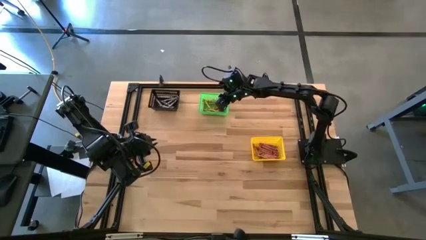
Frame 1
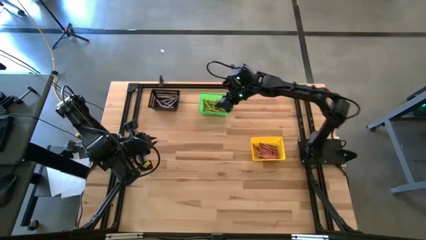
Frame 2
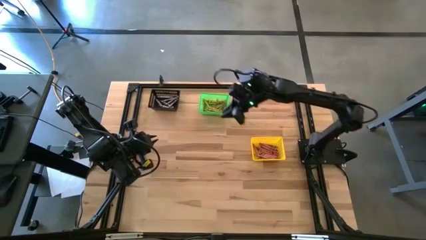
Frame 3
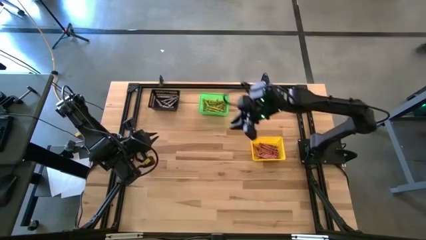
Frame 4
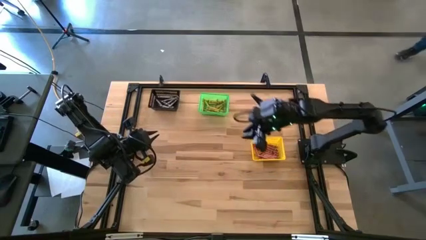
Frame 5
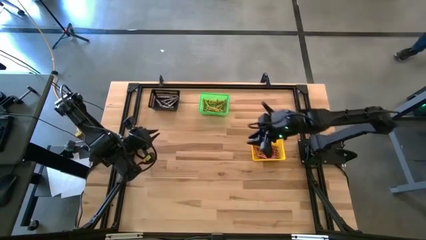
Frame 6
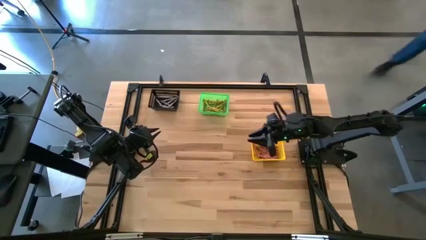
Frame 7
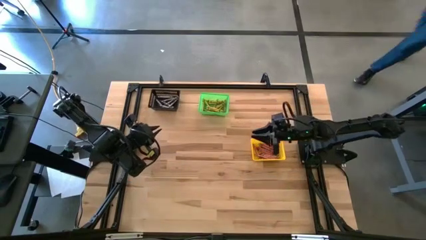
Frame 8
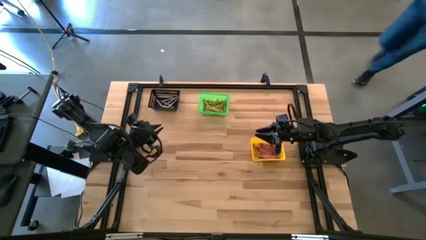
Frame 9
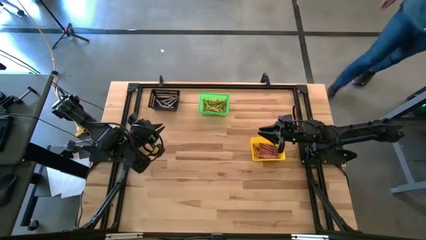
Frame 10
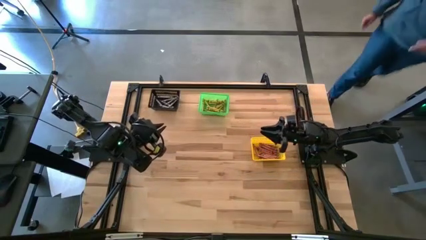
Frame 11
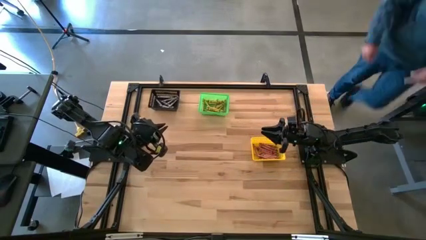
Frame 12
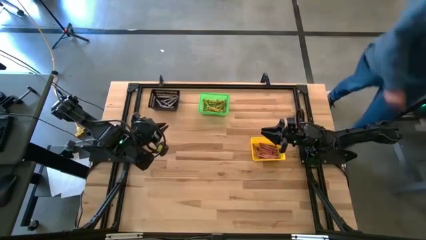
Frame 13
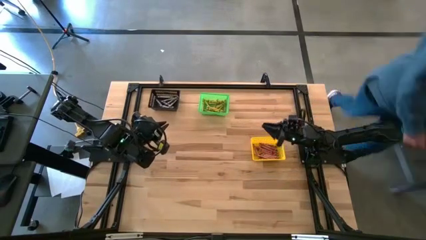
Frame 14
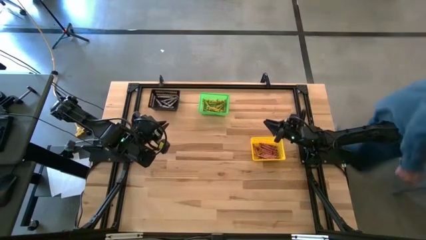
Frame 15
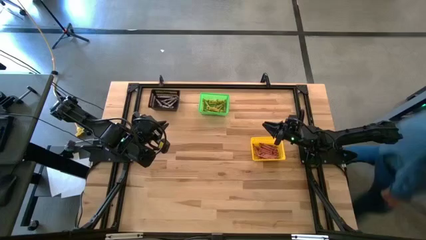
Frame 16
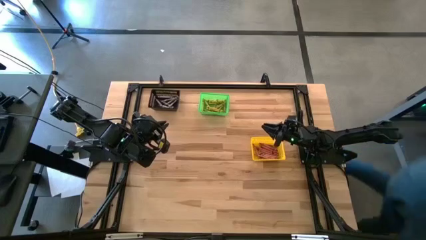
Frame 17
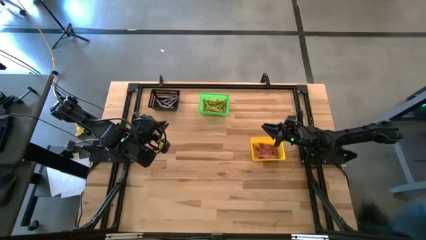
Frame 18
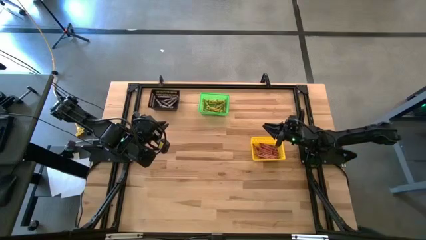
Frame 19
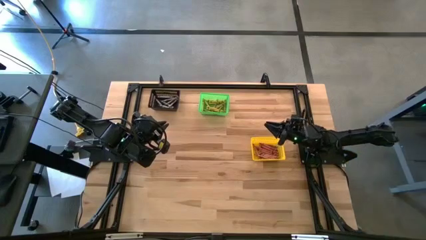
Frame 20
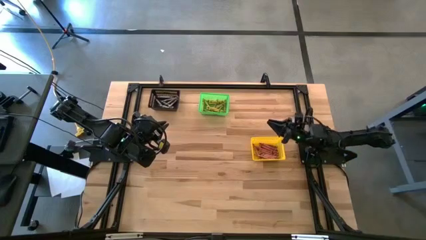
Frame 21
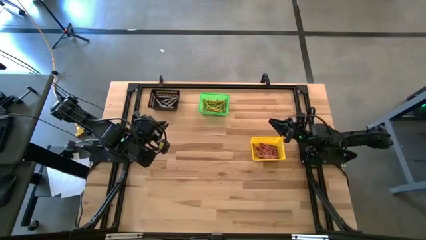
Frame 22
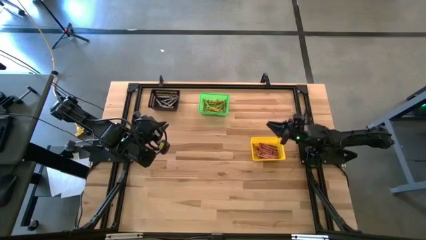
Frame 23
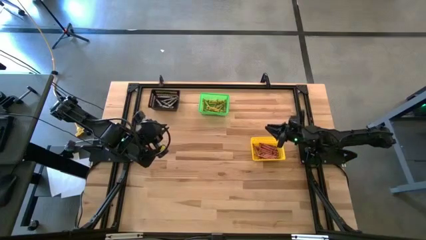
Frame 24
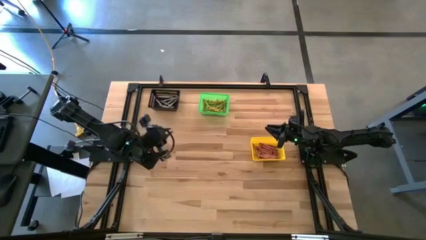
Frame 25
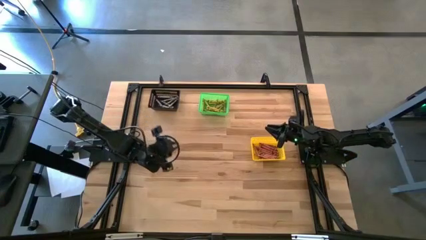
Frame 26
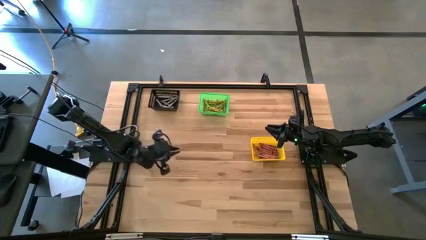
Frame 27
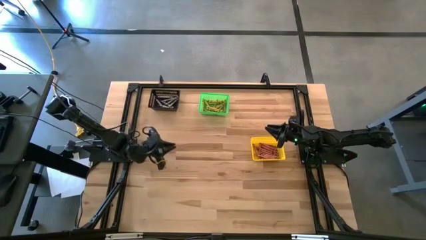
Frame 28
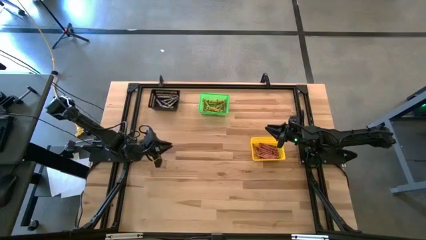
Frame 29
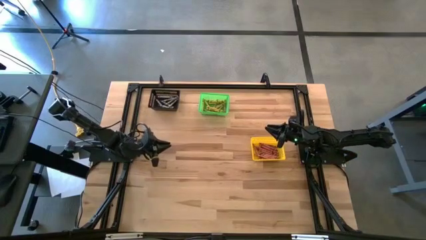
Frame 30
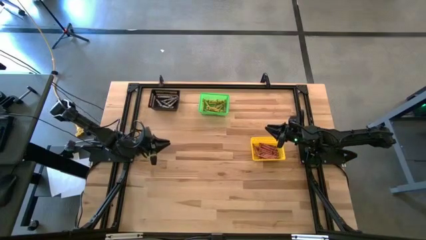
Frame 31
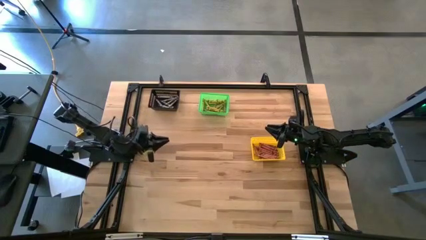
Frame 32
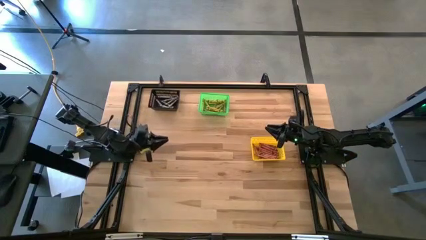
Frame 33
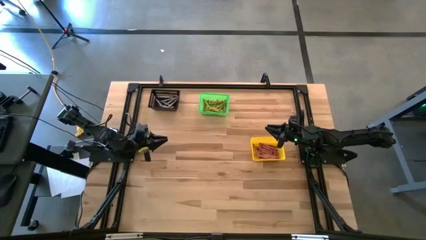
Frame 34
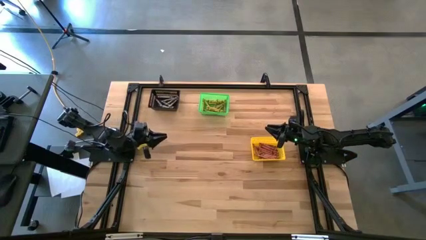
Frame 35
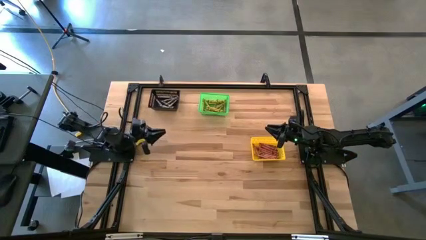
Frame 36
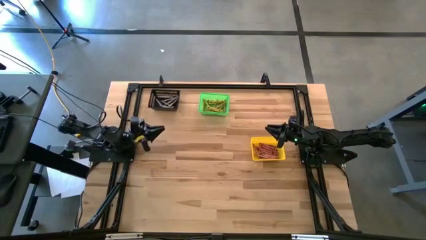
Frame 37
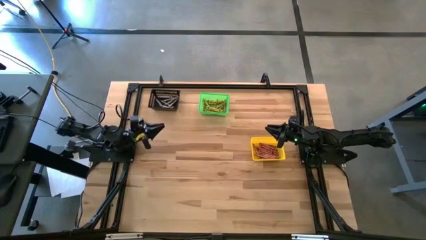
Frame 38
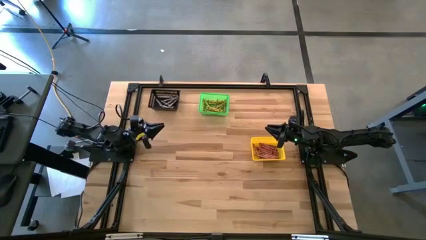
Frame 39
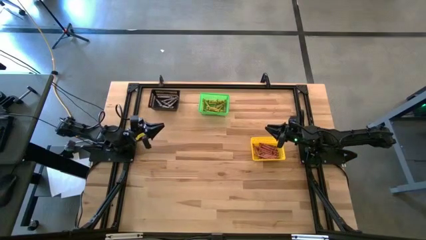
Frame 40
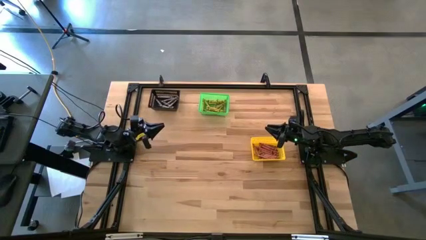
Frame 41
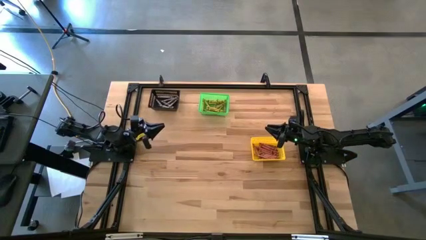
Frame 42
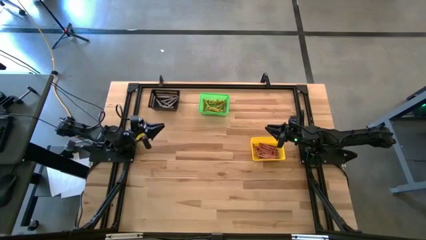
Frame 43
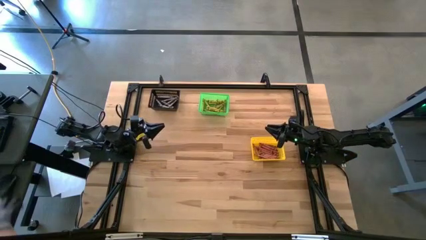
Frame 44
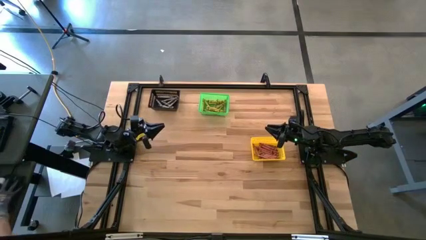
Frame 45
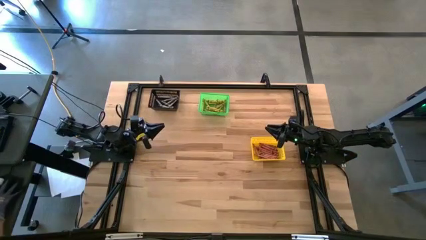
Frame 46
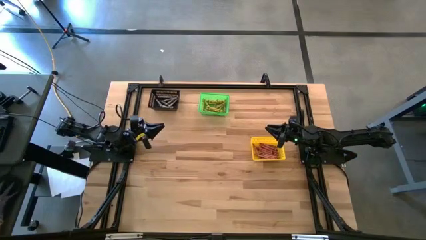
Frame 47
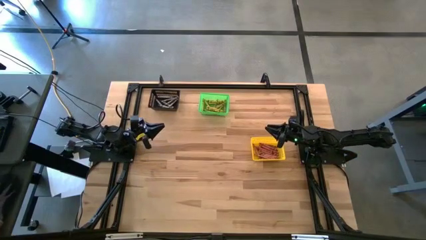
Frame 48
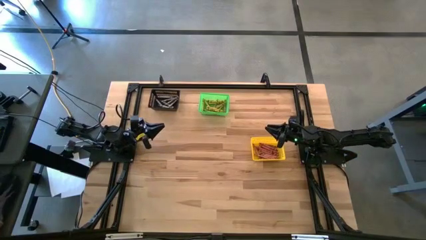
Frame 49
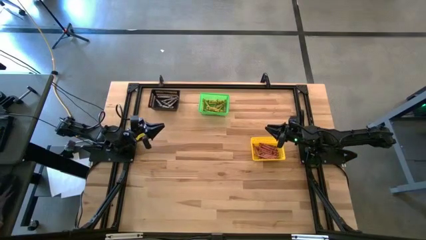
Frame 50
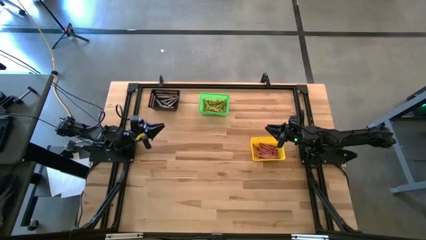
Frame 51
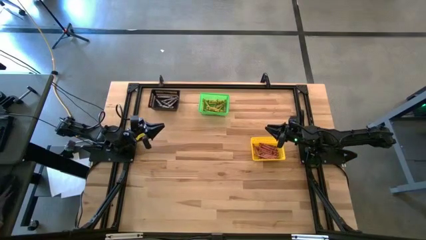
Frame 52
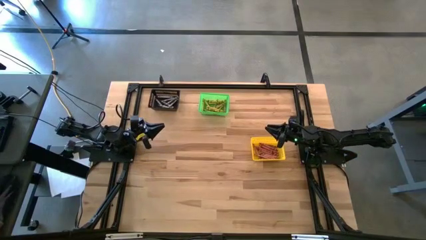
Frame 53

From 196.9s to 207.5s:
Task: Sort crayons
Return to Home Position

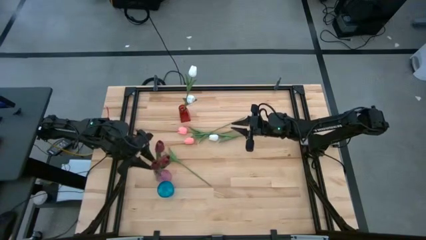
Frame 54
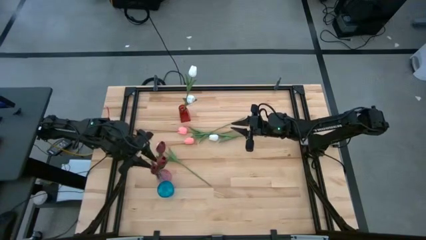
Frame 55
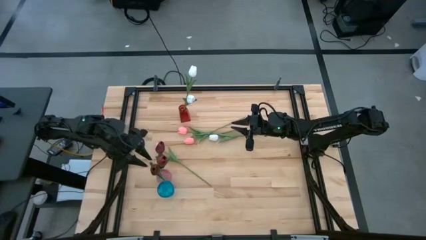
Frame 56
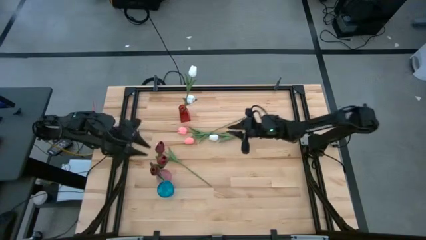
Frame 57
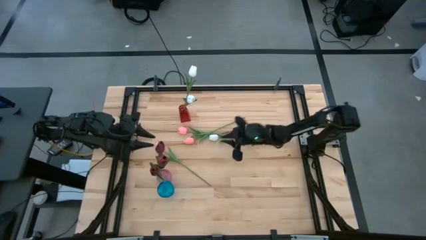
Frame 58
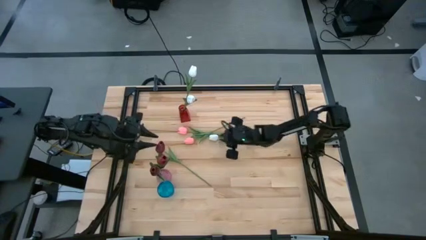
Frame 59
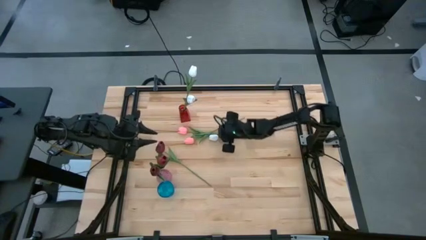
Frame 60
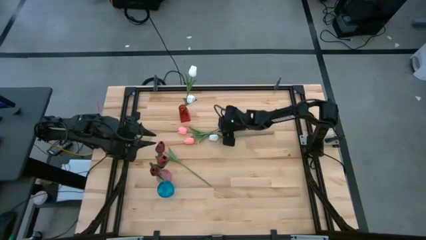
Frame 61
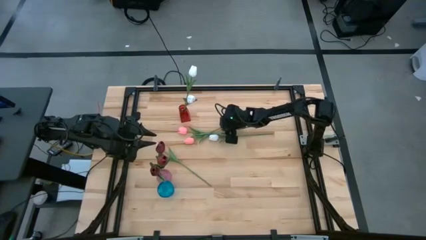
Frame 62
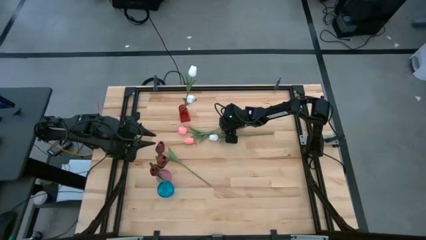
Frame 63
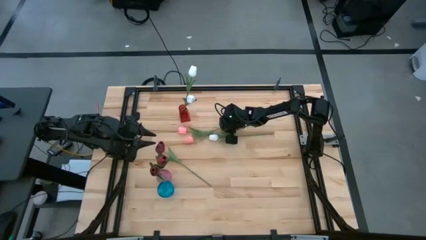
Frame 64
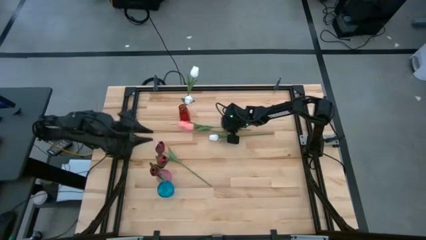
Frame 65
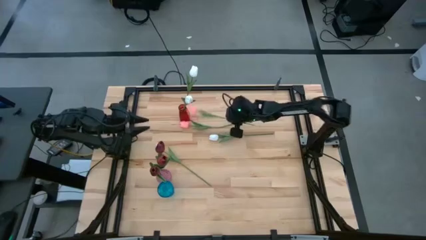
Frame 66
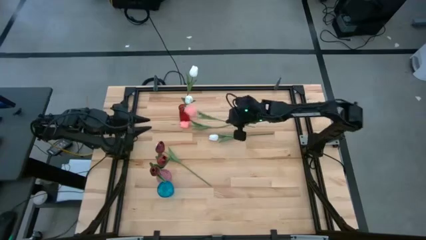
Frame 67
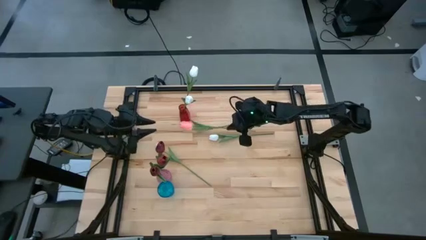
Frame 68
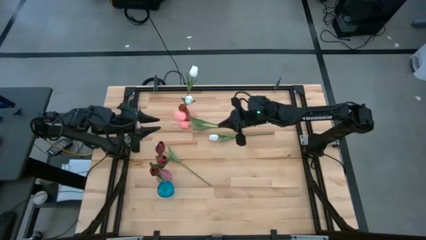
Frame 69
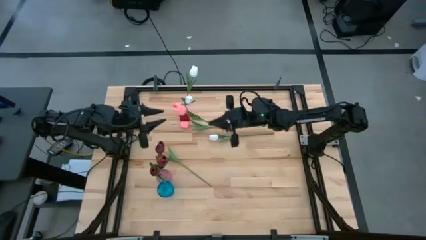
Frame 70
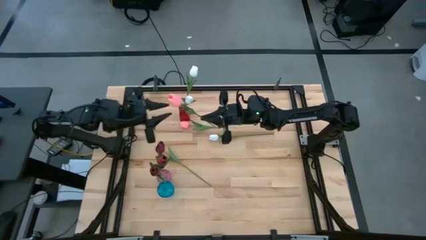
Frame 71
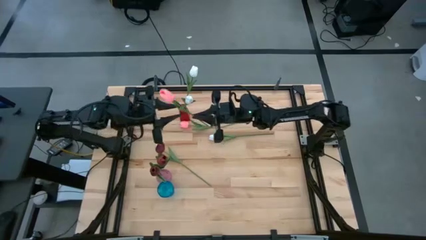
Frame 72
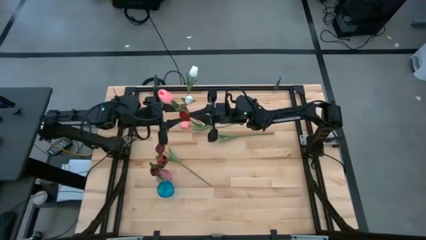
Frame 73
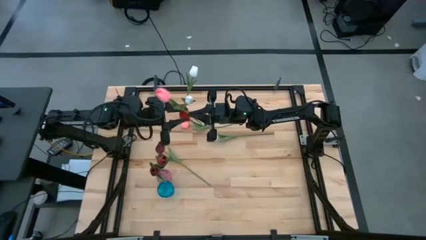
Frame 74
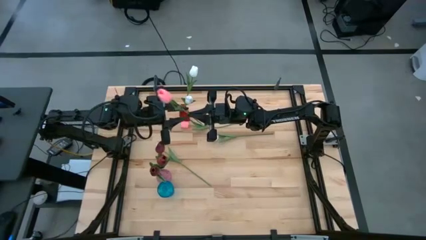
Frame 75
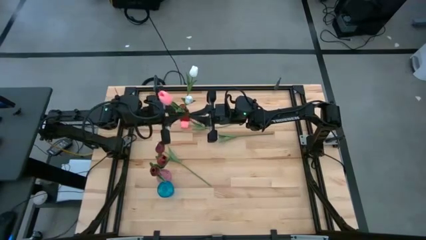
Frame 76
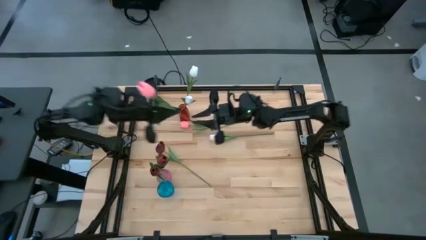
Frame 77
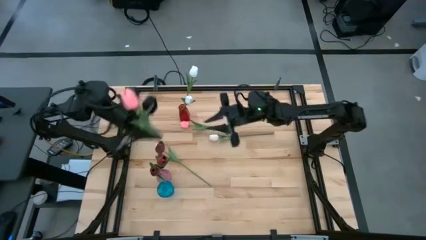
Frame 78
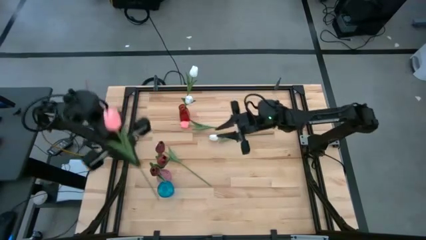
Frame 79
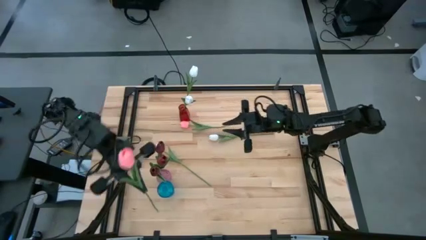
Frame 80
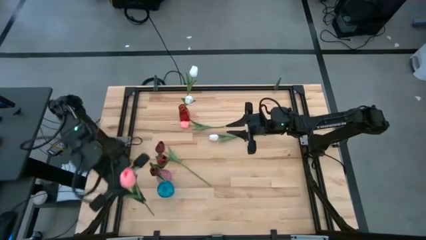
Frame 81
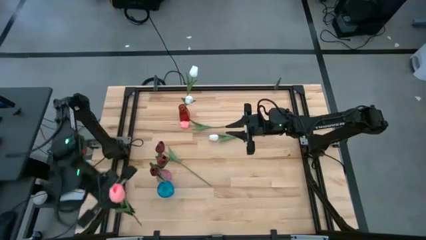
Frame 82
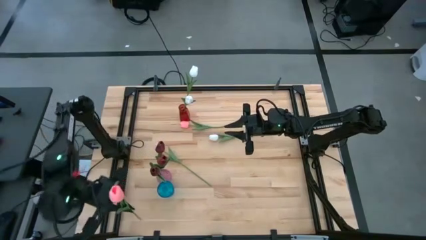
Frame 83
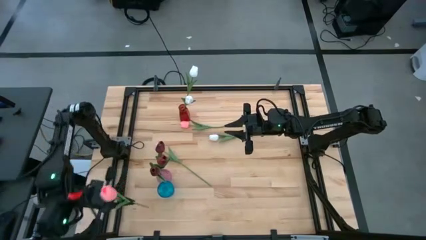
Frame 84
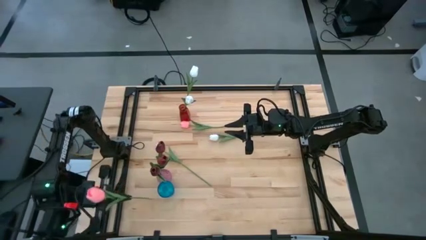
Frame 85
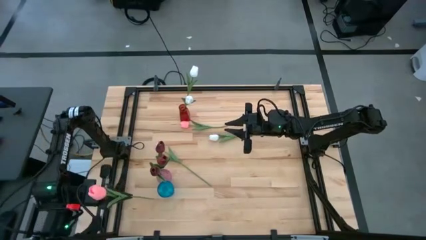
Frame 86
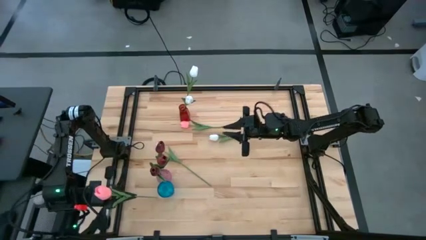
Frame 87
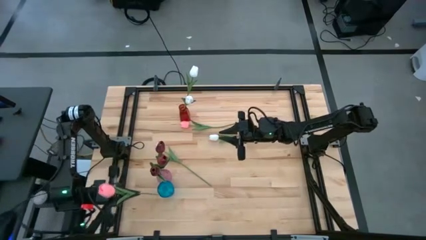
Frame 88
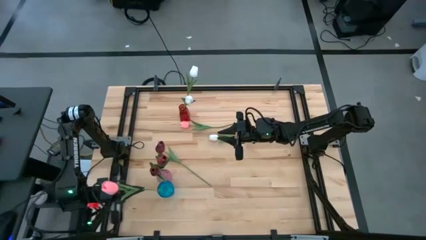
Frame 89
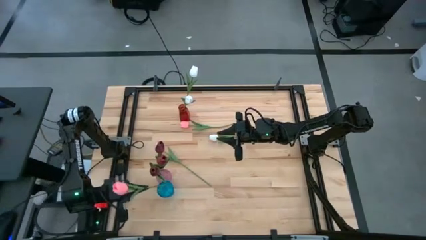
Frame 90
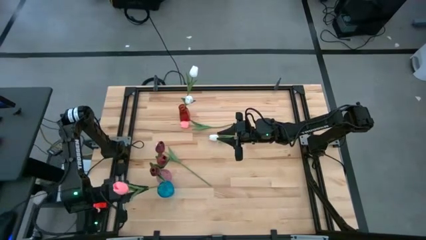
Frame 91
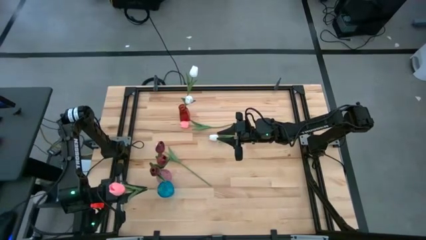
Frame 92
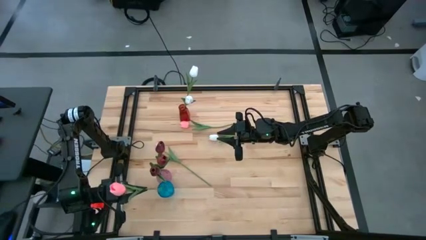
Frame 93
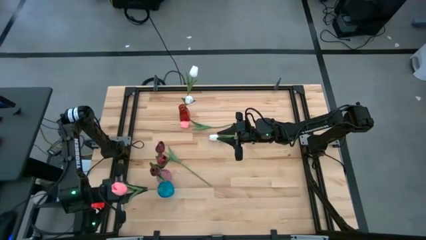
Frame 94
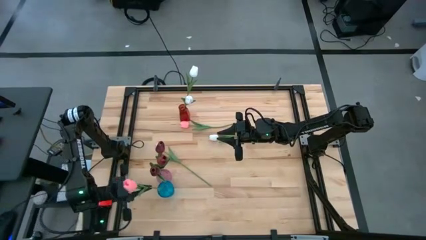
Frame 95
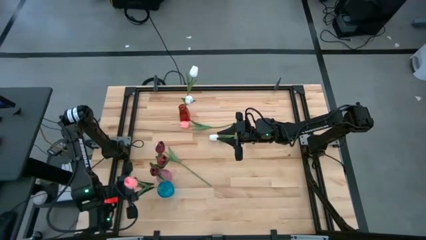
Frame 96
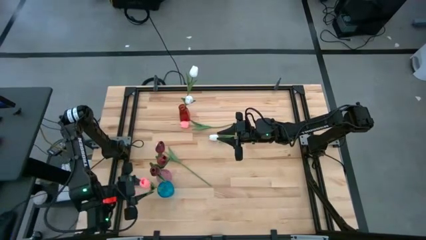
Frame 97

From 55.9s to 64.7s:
Task: Sort flowers into vase by color
Put the center pink tulip into the blue vase
